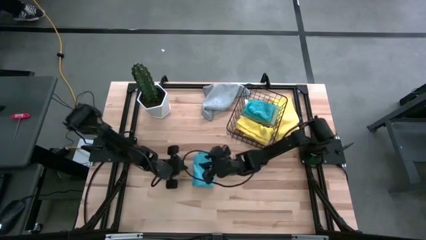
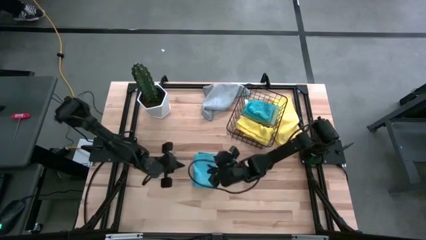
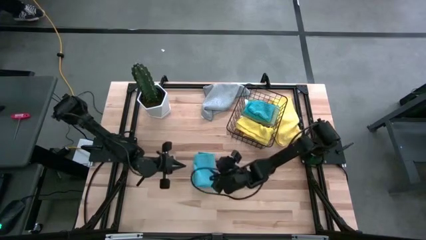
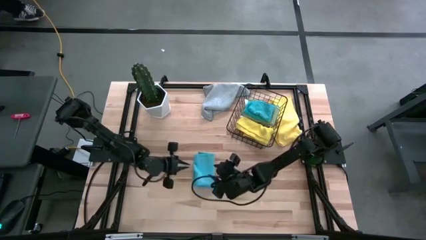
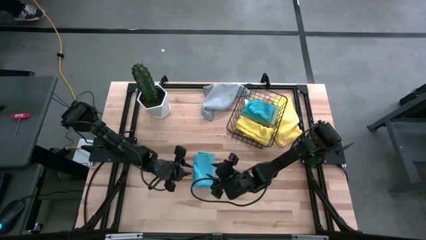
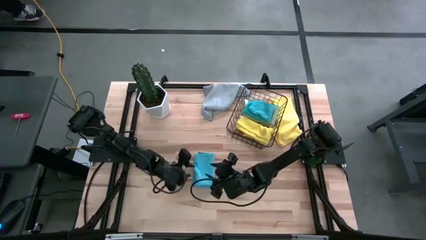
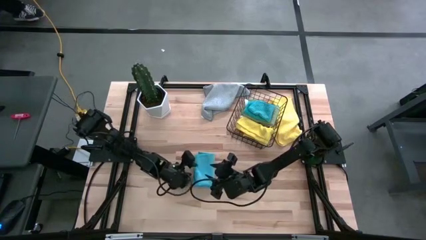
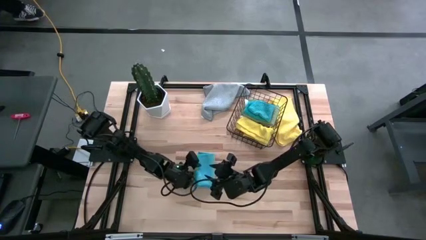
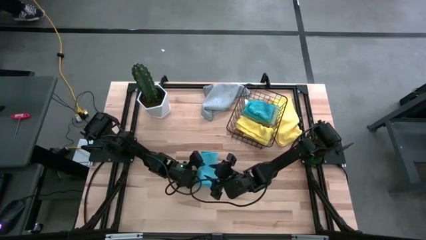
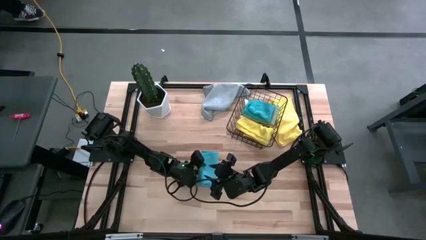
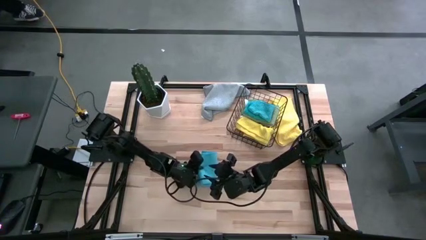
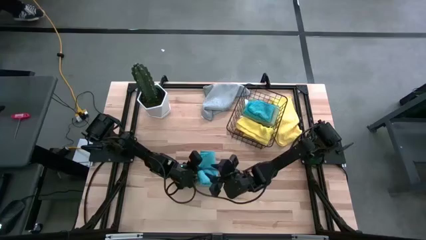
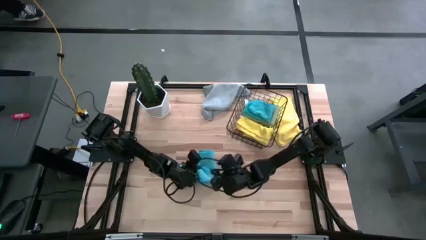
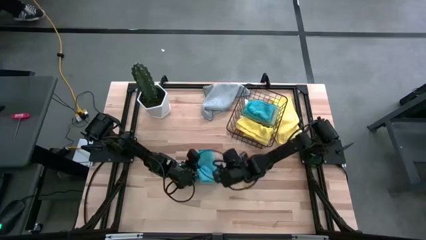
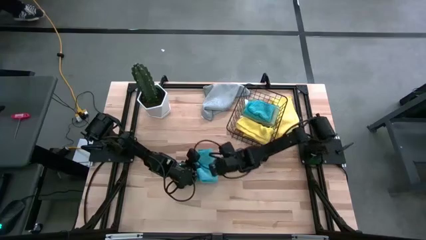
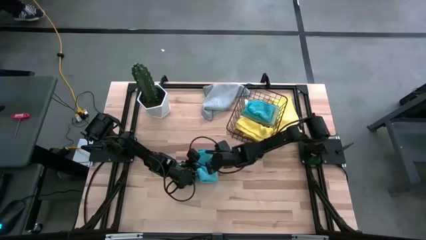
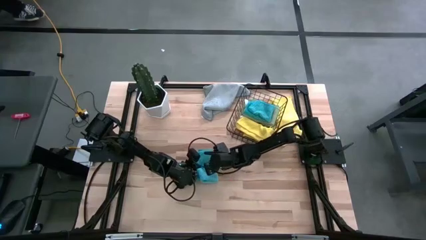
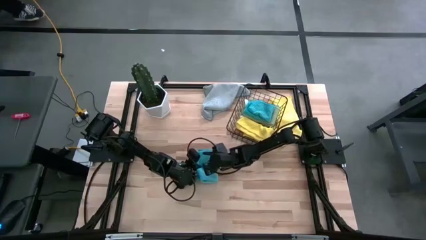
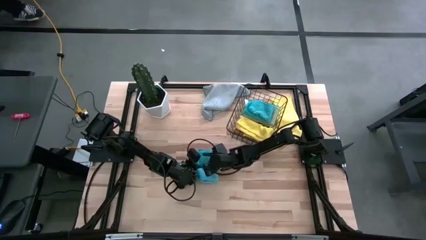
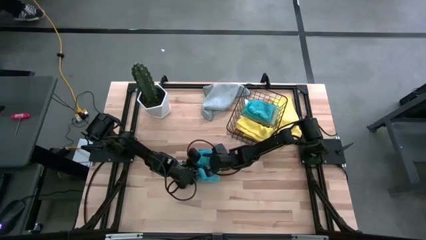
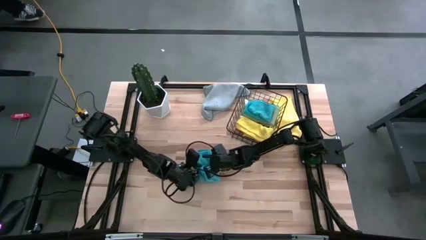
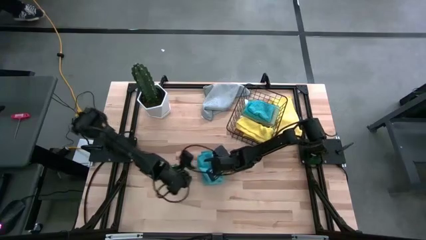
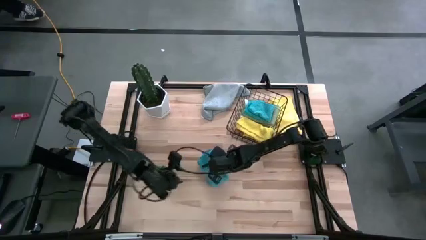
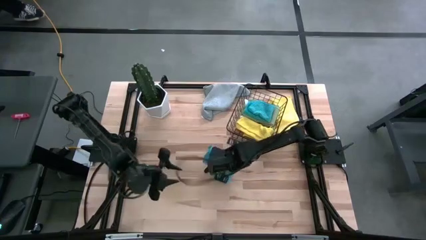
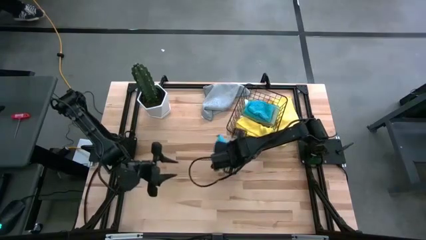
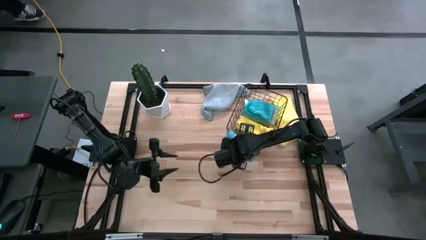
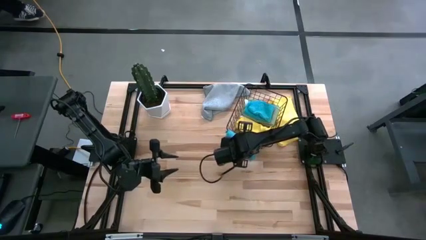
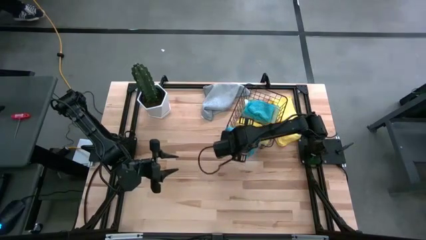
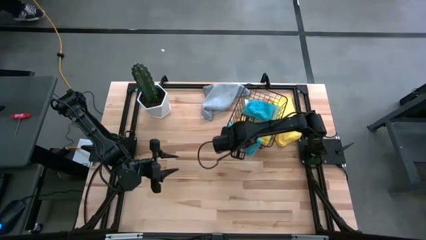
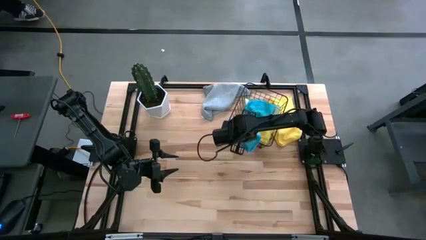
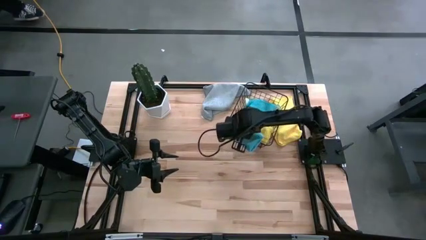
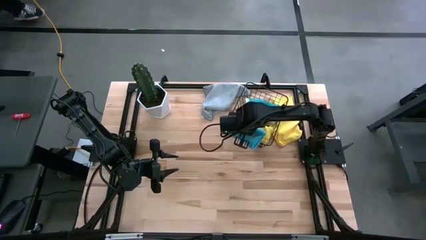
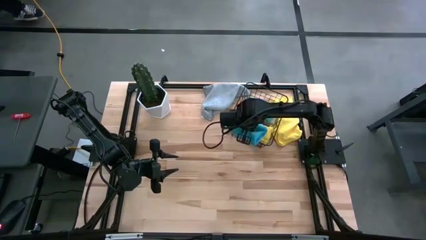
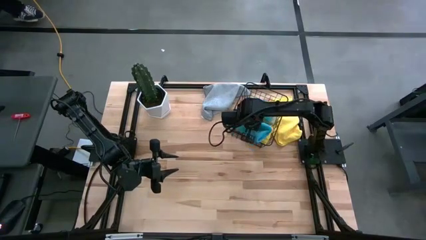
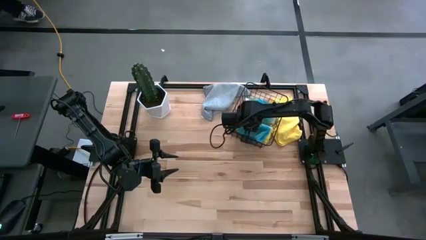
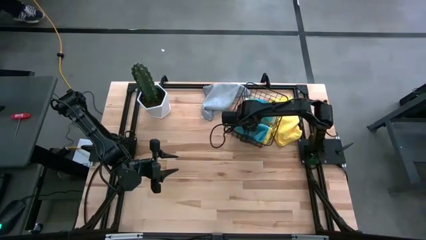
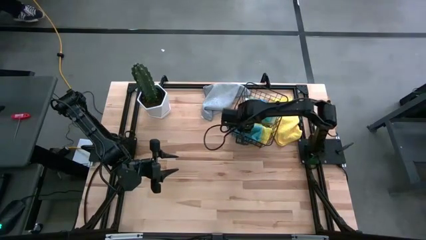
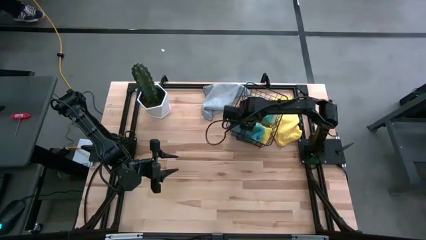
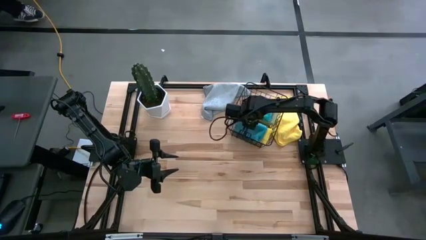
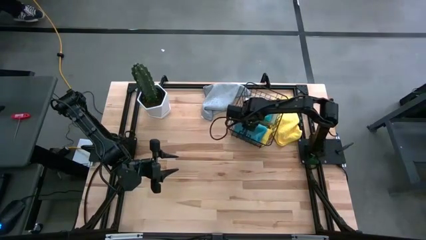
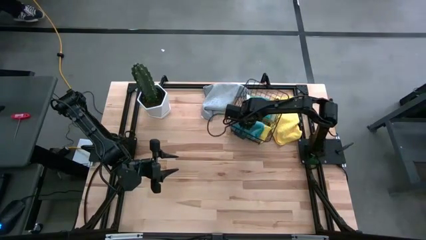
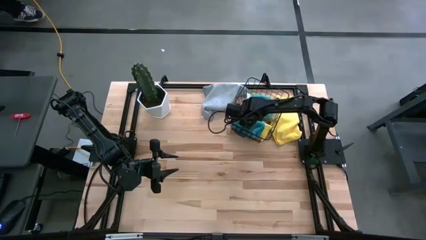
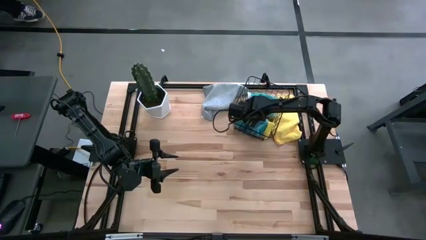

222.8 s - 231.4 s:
Task: Fold microfiber towels
Put the folded blue microfiber towel into the black wire basket

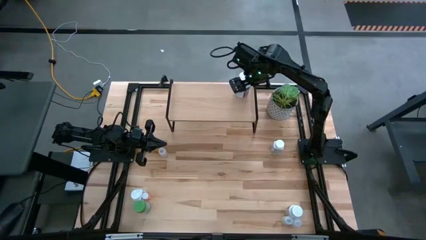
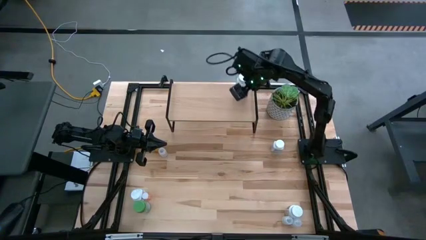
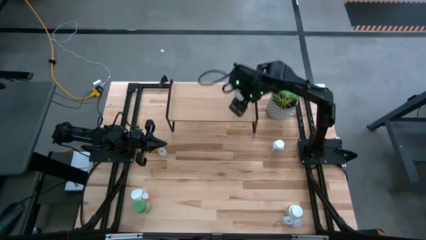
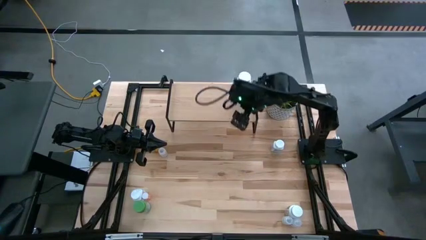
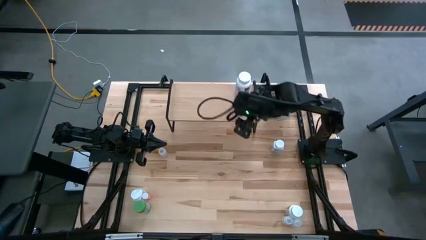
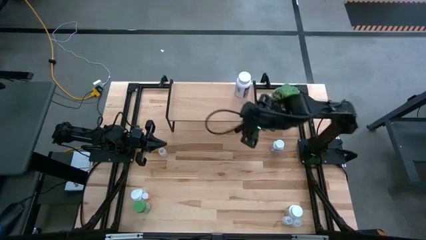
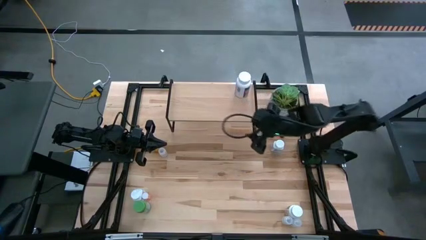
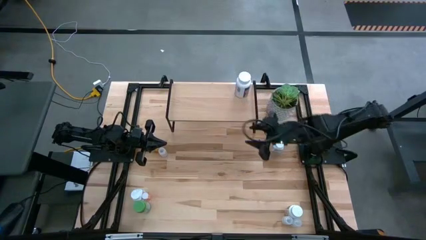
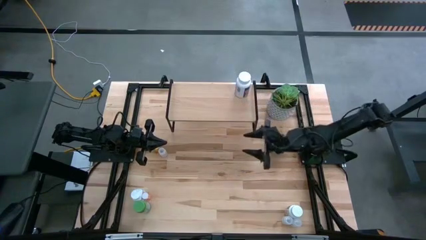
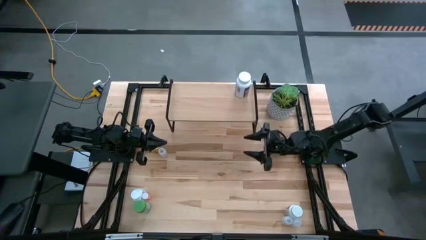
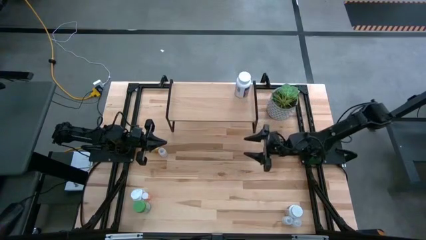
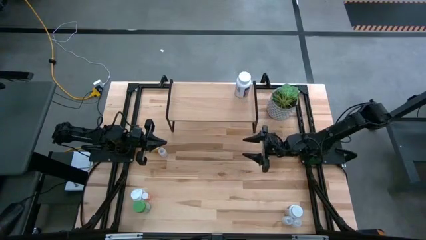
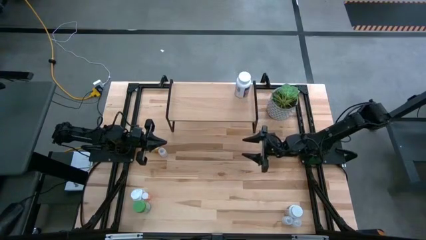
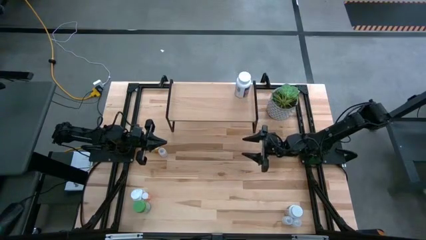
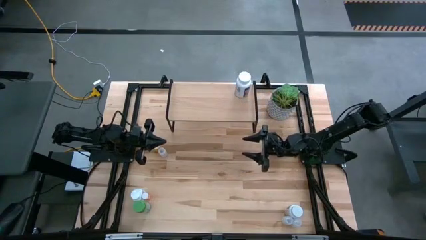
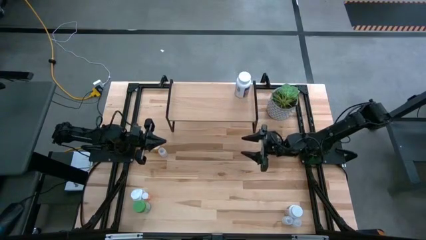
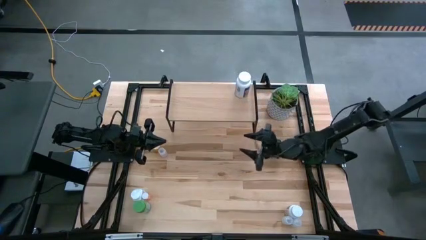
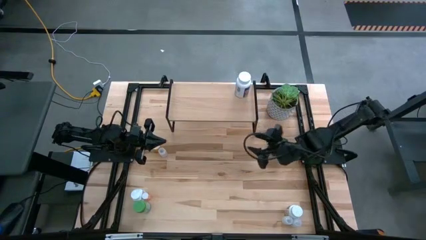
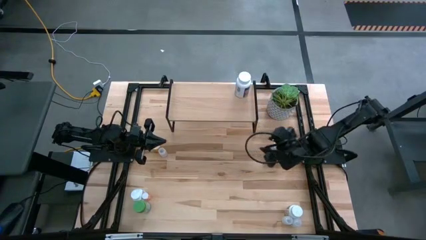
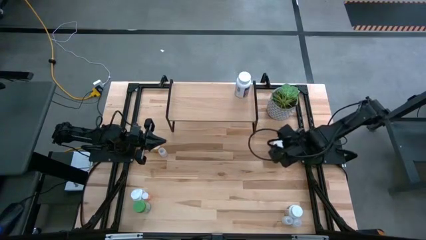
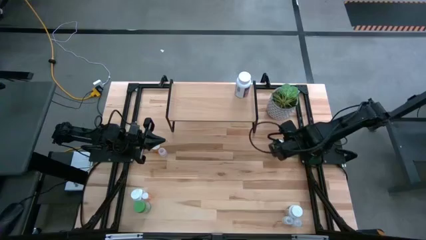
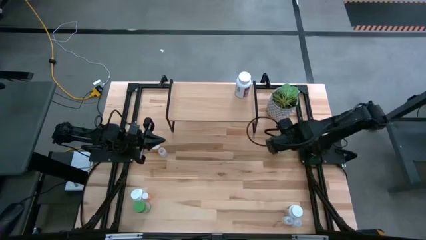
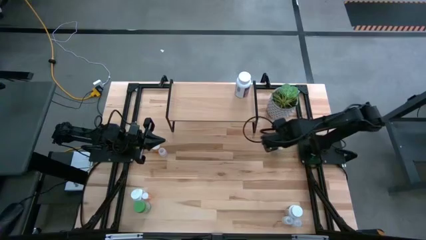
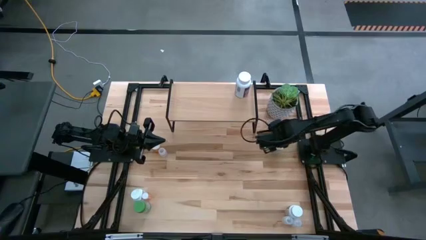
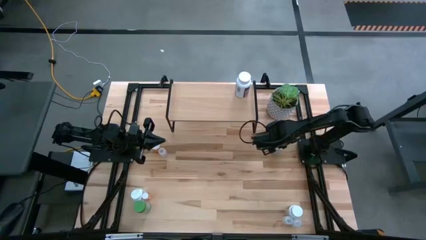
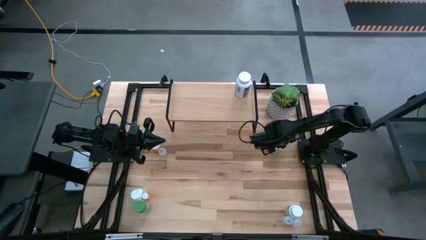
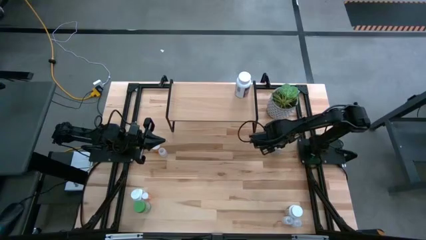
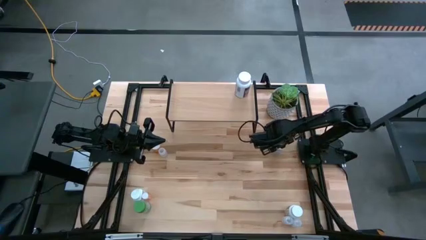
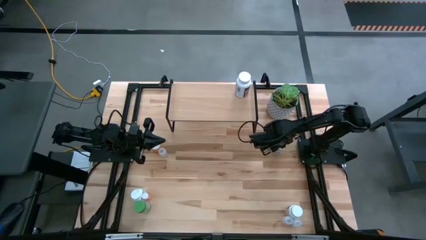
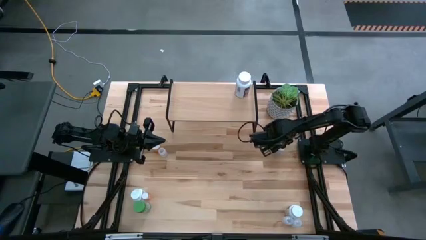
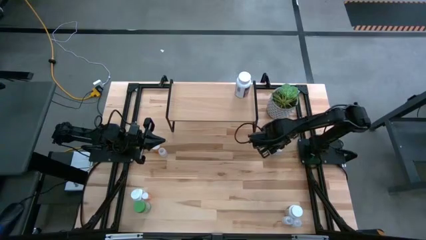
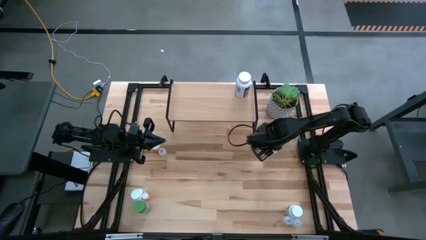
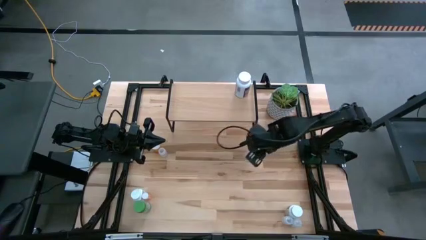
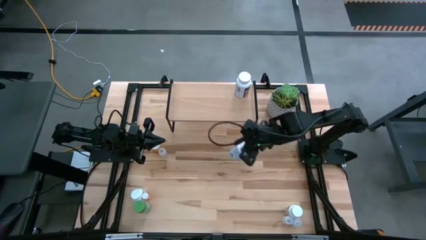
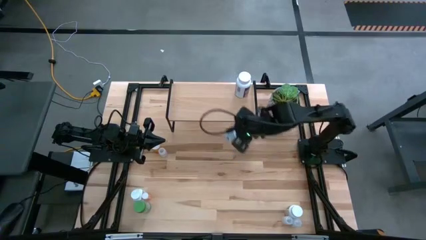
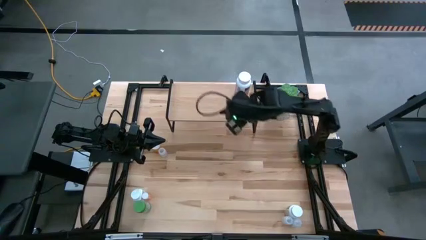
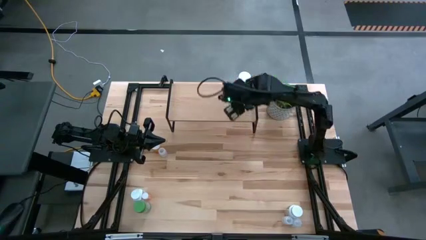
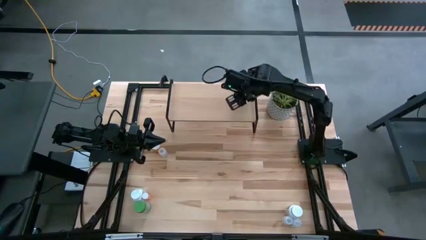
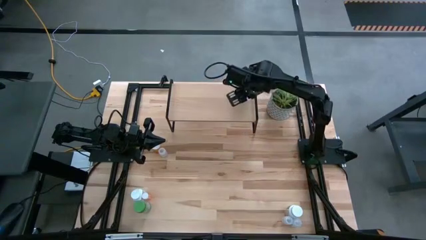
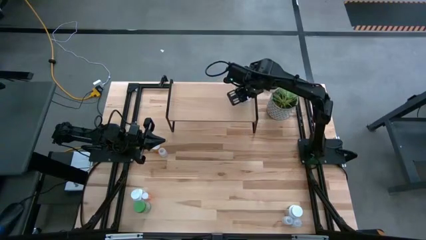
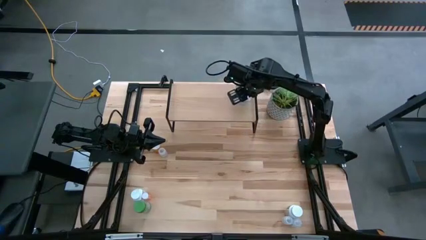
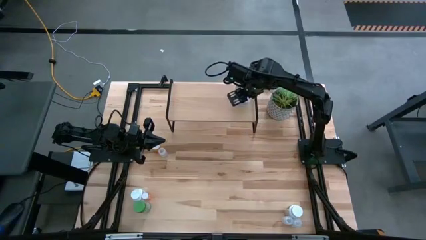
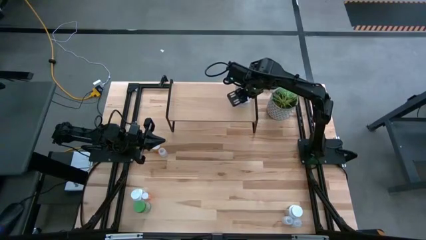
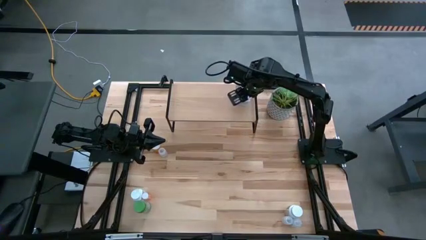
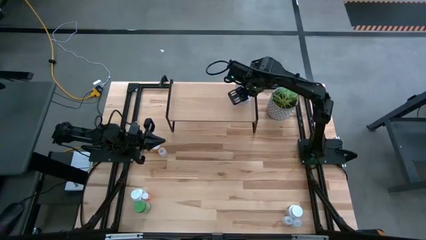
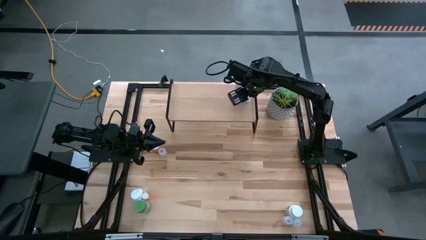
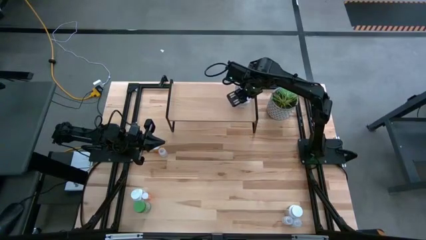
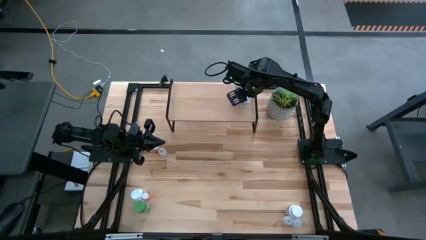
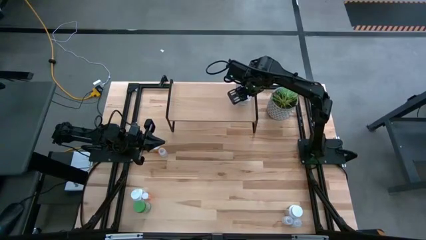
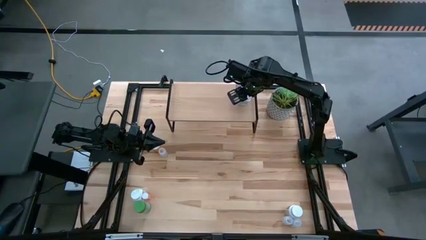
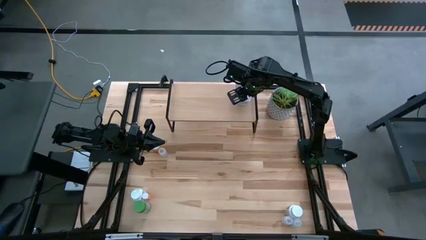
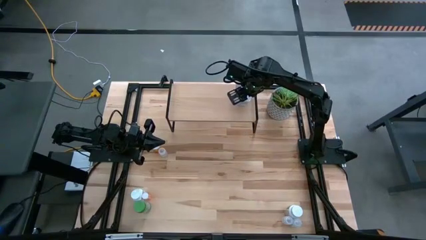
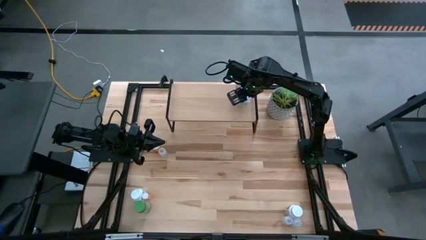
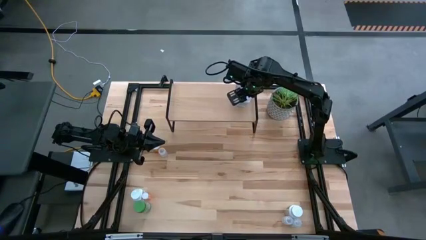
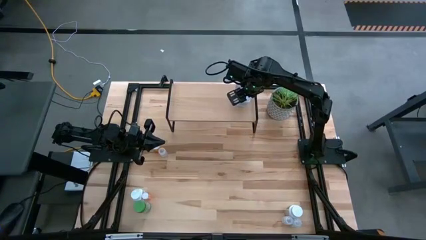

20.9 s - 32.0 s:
Task: Pick and place medicine bottles onto shelf by color
Put the top white pill bottle on the shelf
